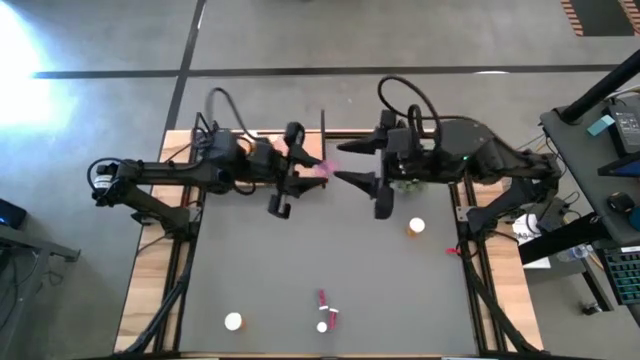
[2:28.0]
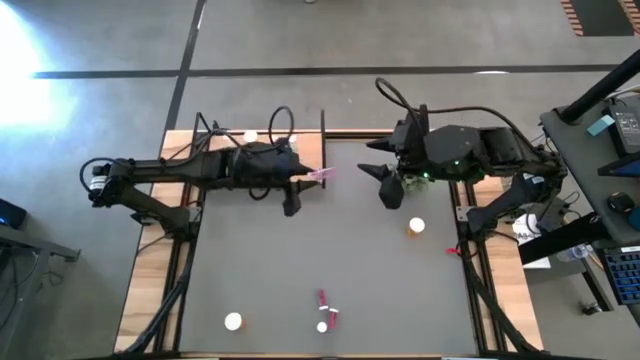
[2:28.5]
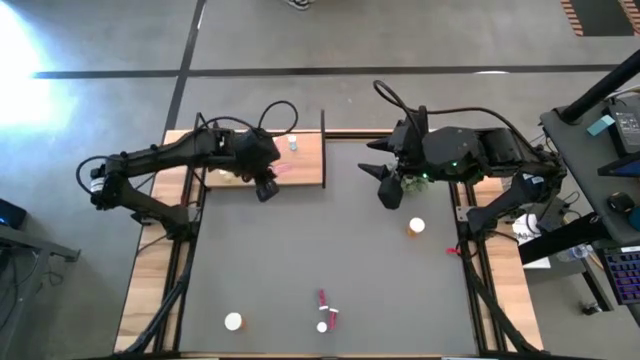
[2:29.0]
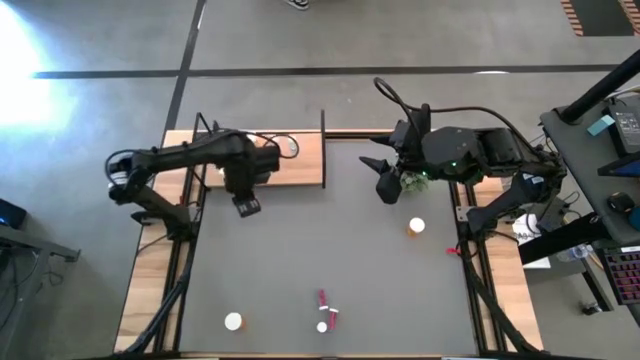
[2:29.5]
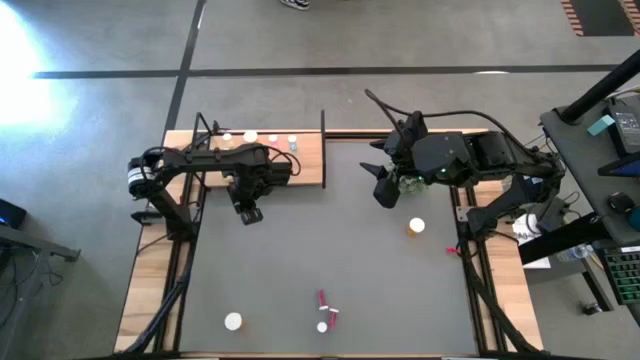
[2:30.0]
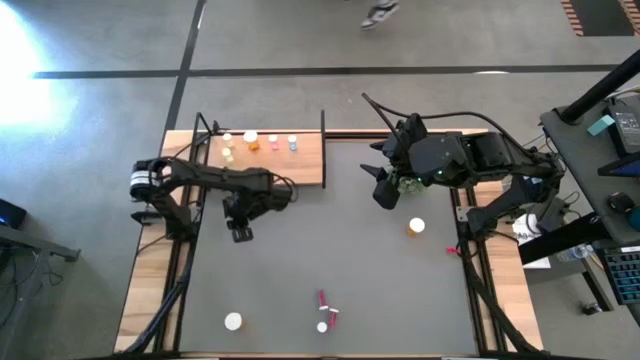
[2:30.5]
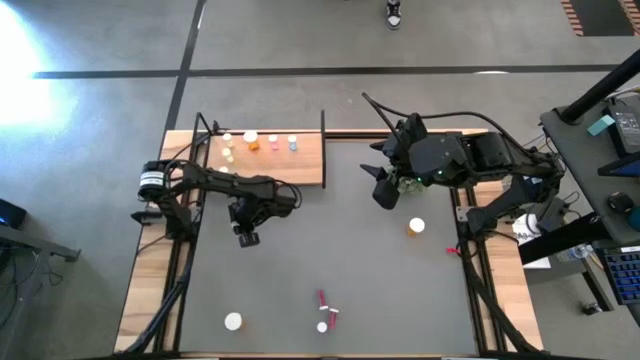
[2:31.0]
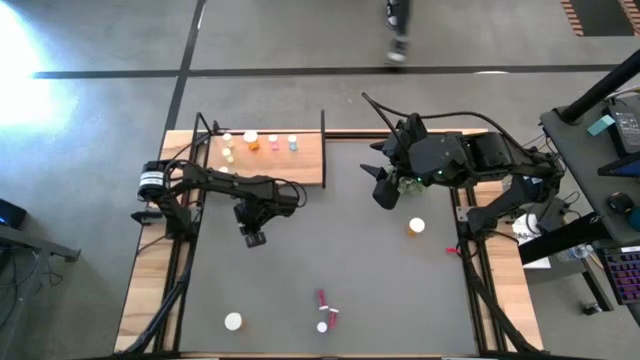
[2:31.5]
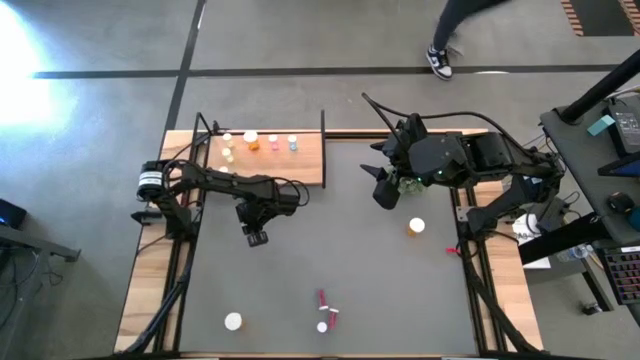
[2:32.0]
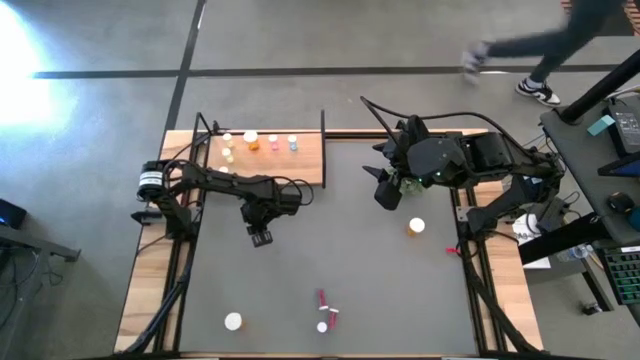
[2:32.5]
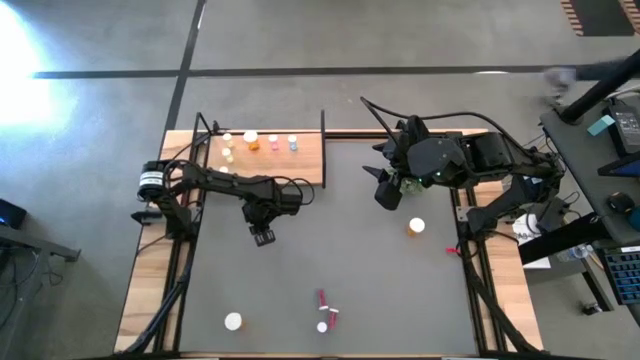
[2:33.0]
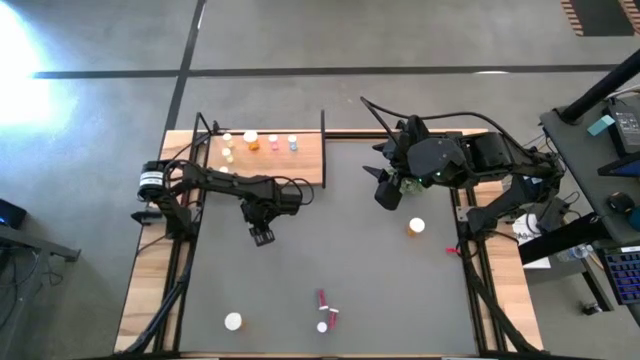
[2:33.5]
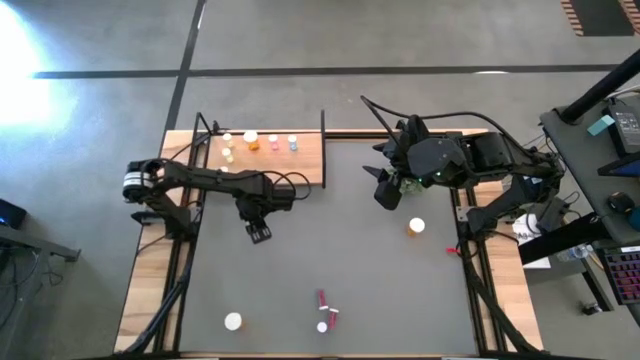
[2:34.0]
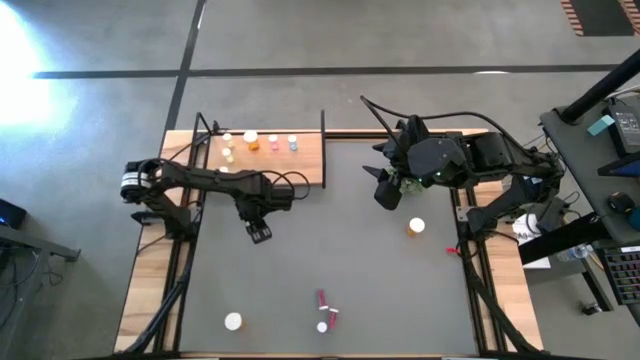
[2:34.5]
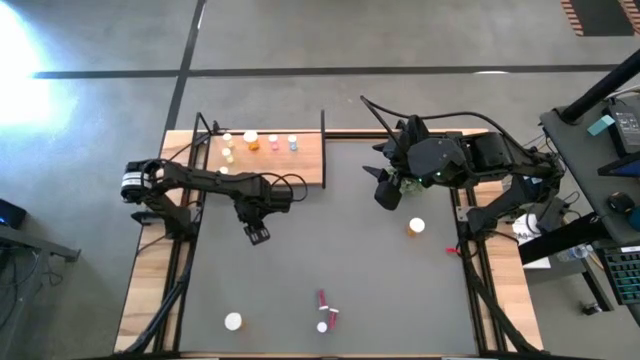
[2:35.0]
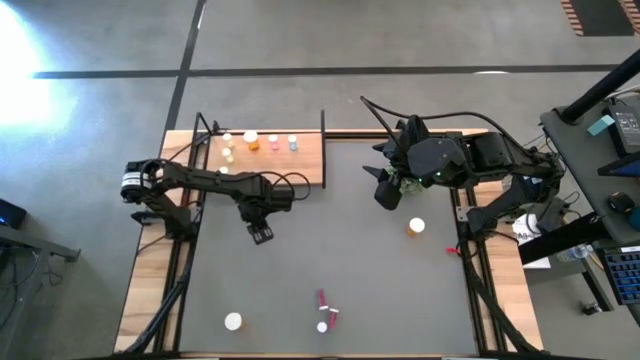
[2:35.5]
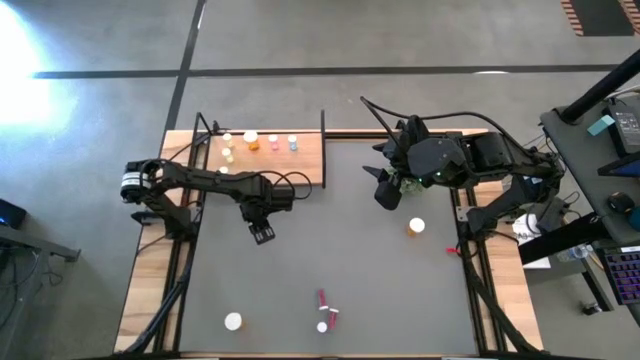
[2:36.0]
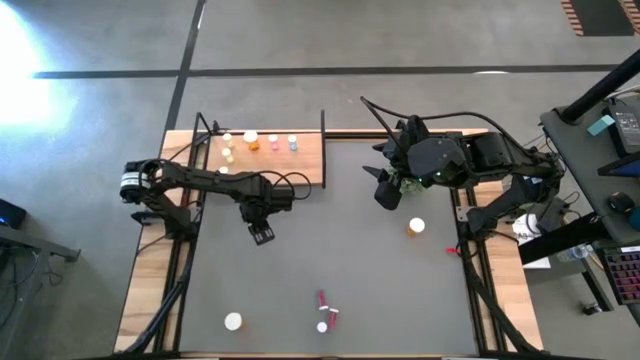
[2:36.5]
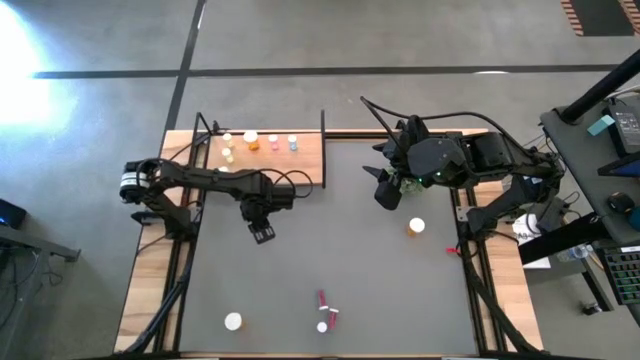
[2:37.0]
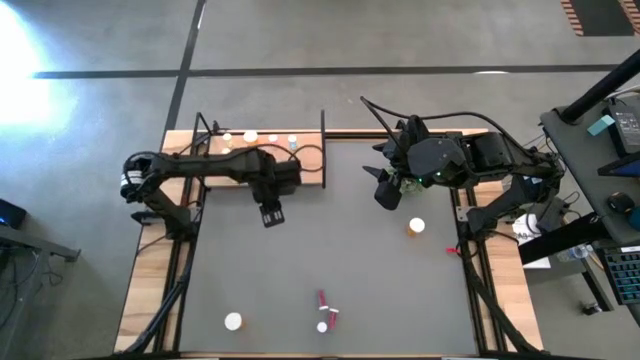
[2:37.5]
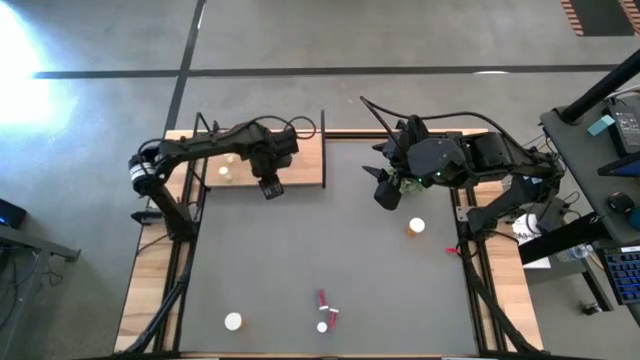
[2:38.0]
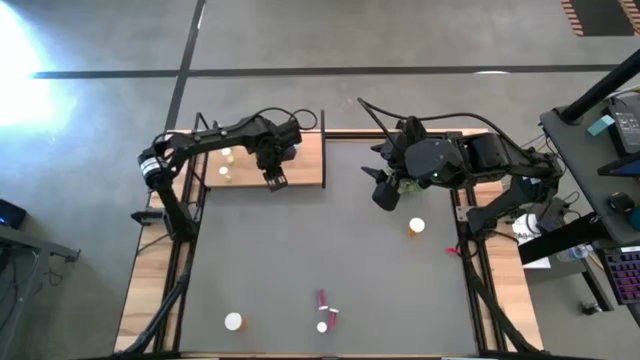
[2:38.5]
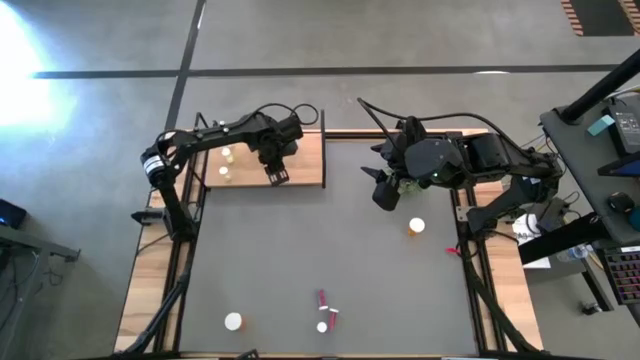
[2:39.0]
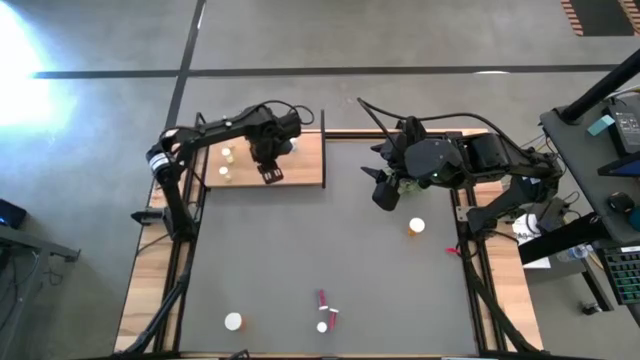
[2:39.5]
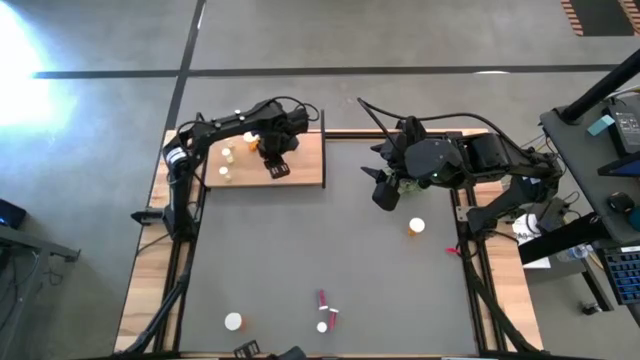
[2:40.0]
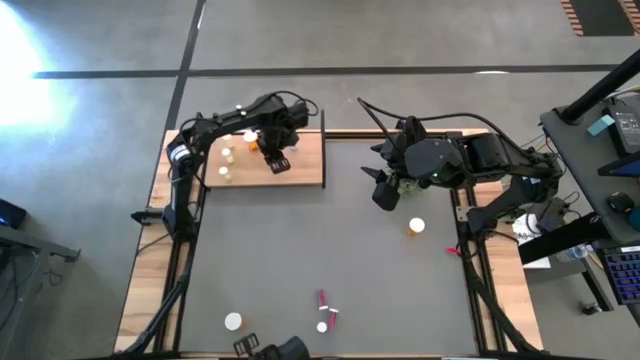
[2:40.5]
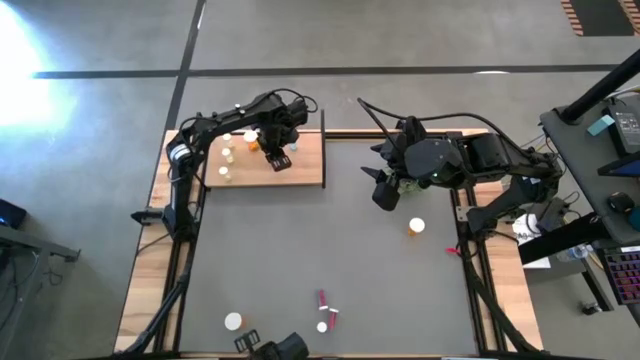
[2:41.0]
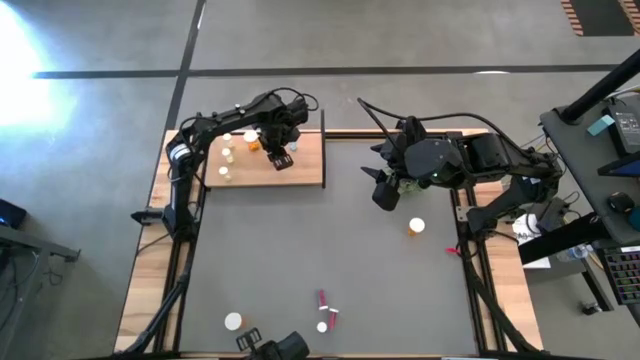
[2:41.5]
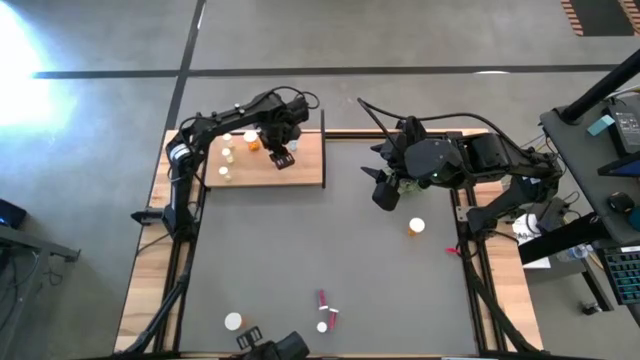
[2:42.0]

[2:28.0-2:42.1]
Task: Pick and place medicine bottles onto shelf by color
Put the right pink pill bottle on the shelf aligned with the other pink bottle

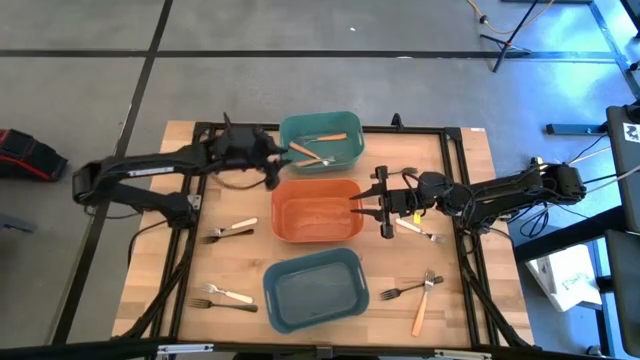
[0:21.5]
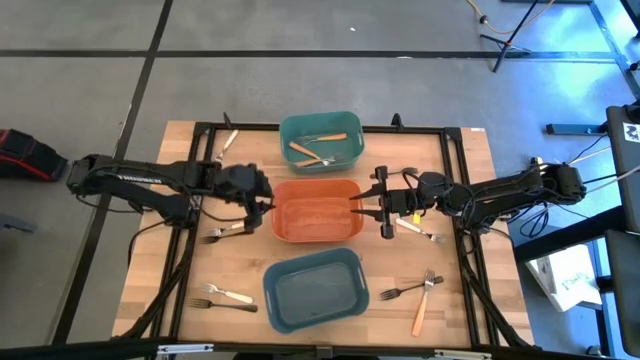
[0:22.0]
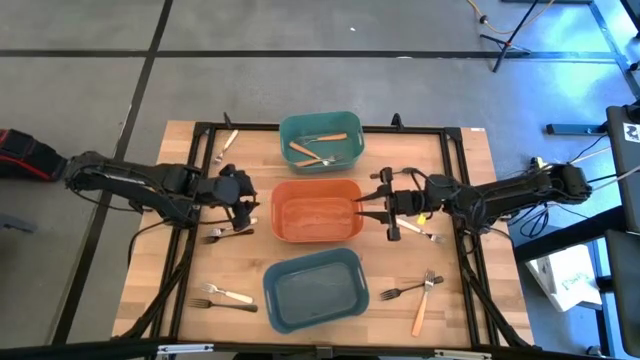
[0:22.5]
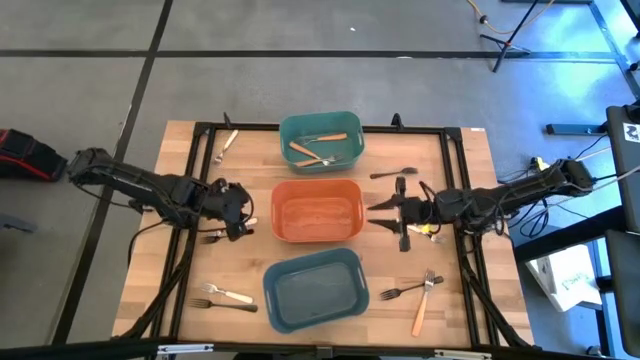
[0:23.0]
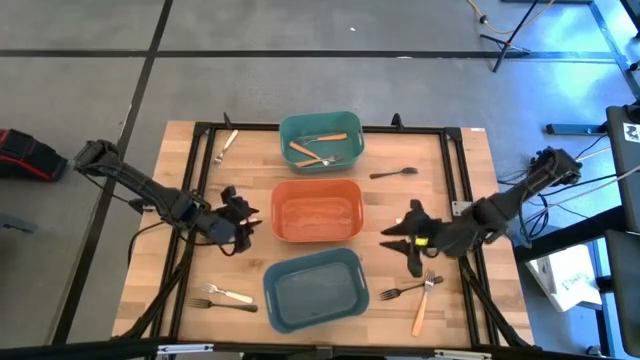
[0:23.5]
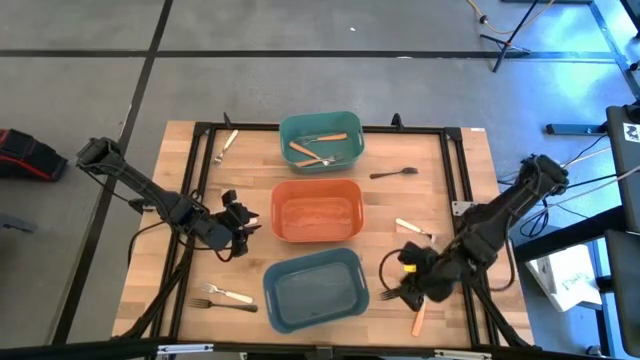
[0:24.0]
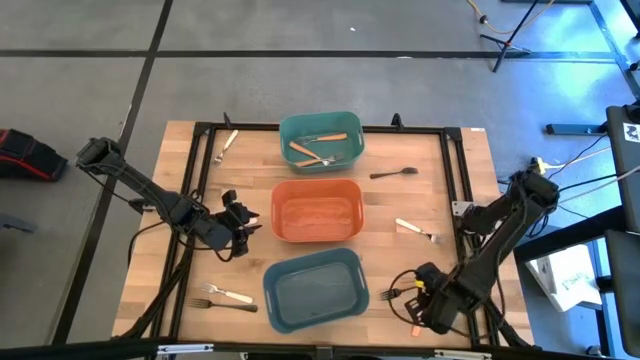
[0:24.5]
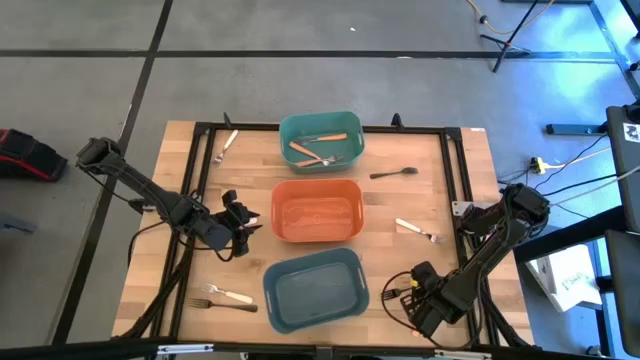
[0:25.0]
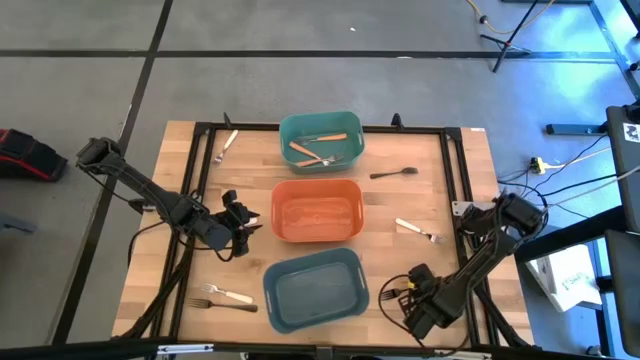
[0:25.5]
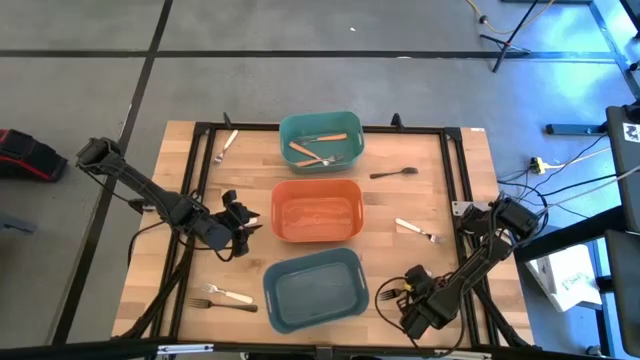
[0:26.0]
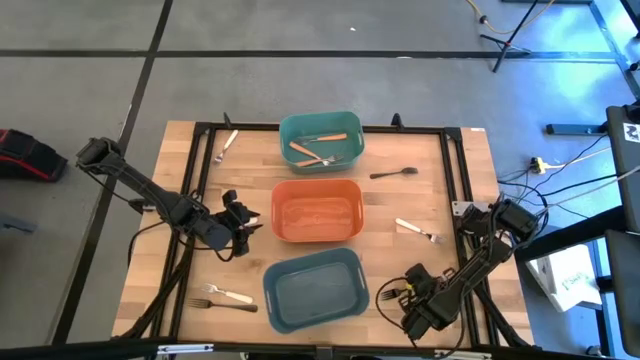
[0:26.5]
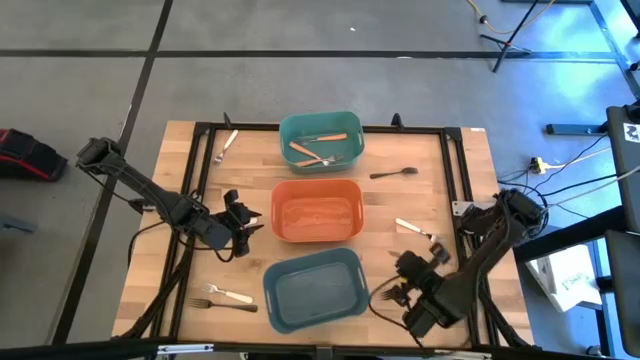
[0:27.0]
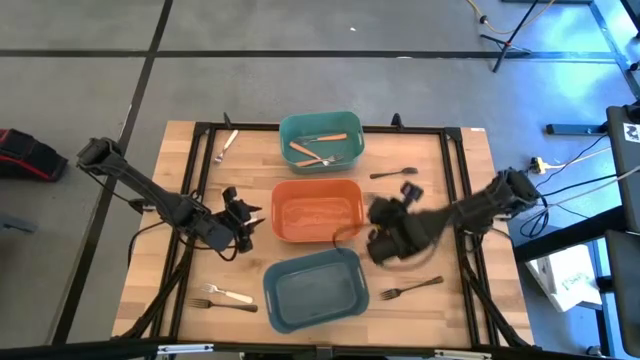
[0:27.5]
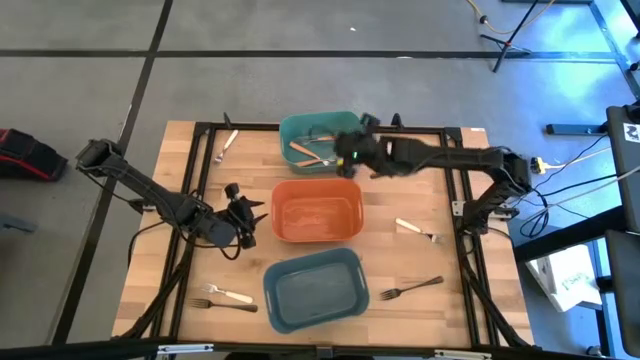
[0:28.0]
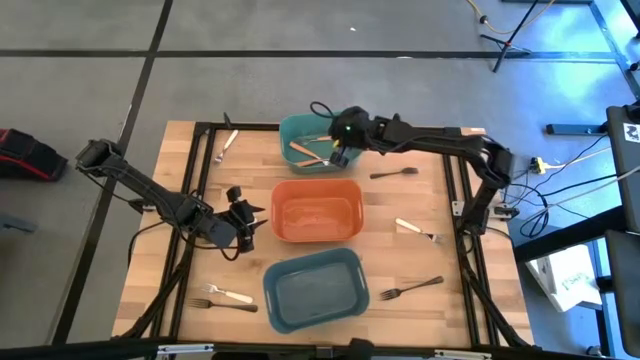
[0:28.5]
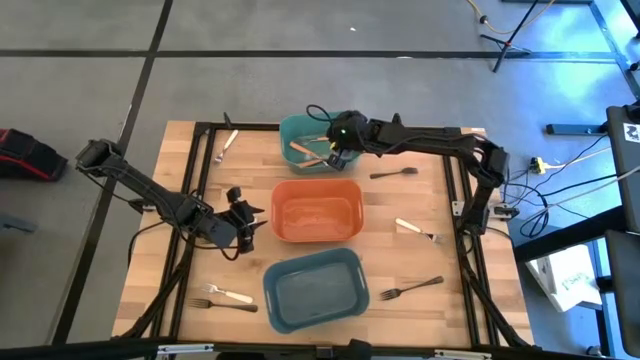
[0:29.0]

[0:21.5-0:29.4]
Task: Sort silverware by color (type)
Put the orange fork into the green bin
